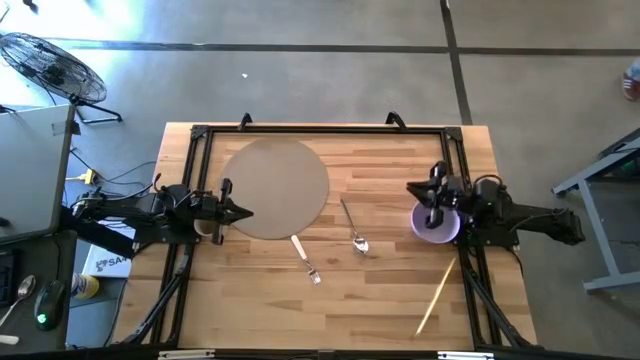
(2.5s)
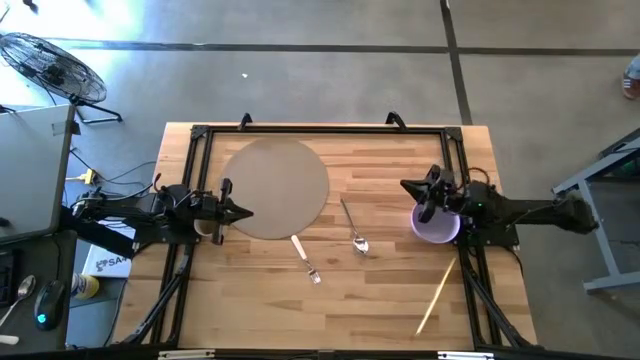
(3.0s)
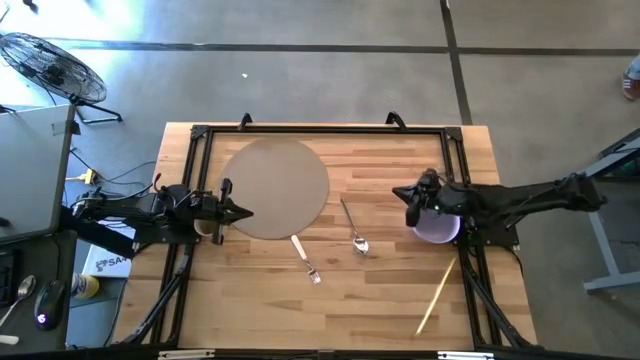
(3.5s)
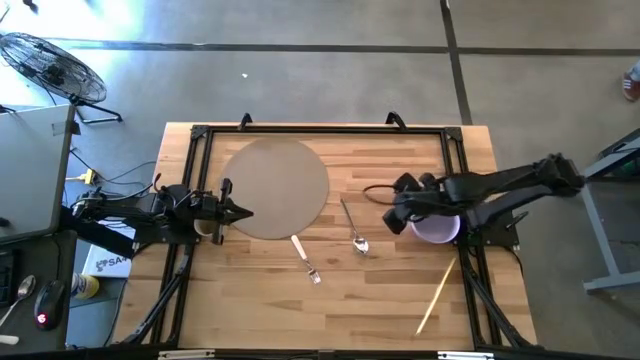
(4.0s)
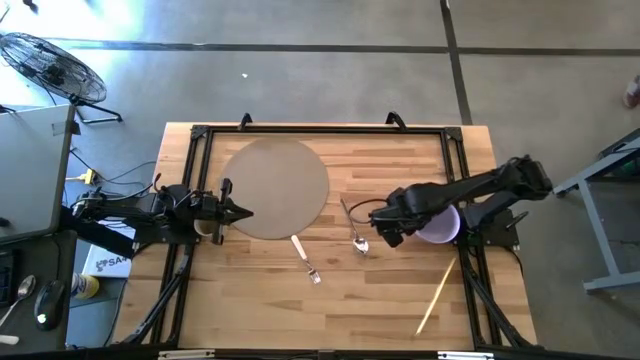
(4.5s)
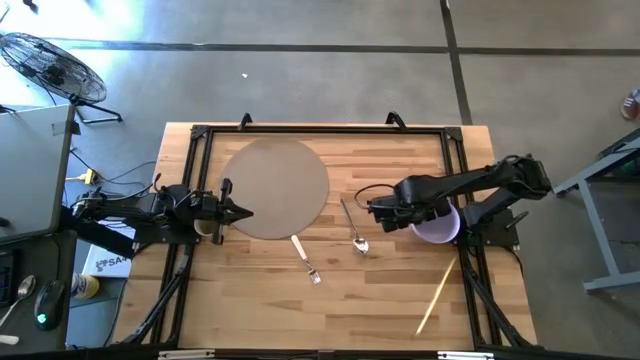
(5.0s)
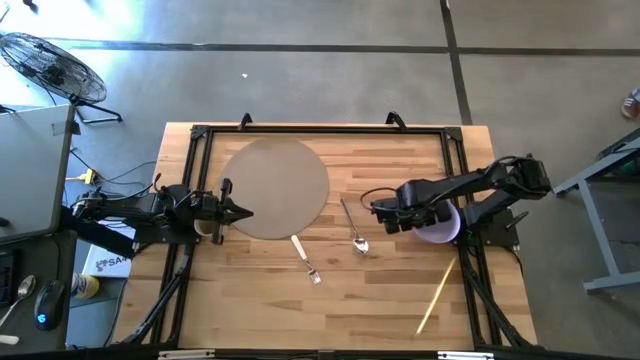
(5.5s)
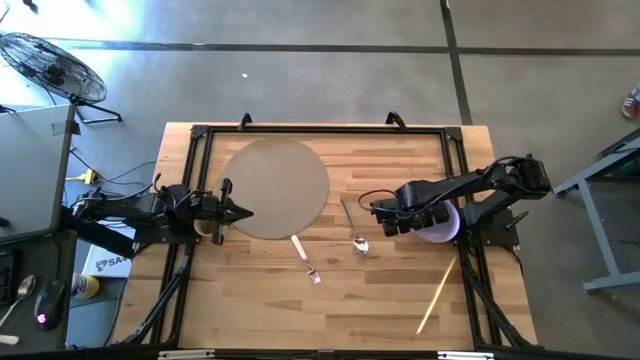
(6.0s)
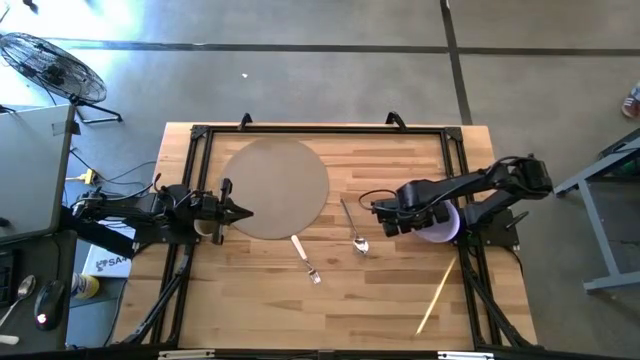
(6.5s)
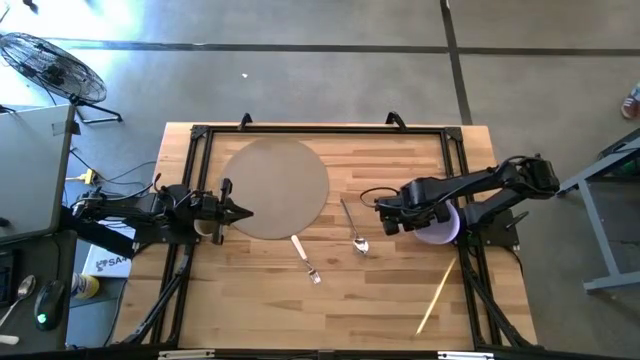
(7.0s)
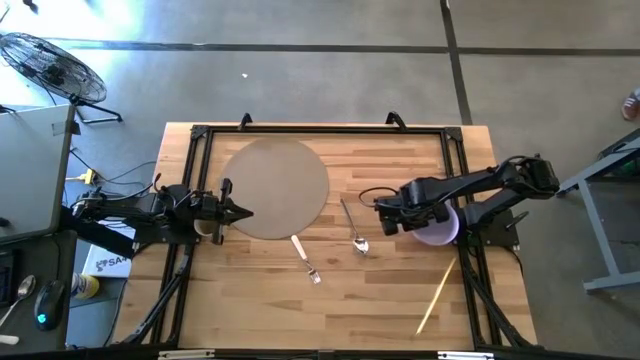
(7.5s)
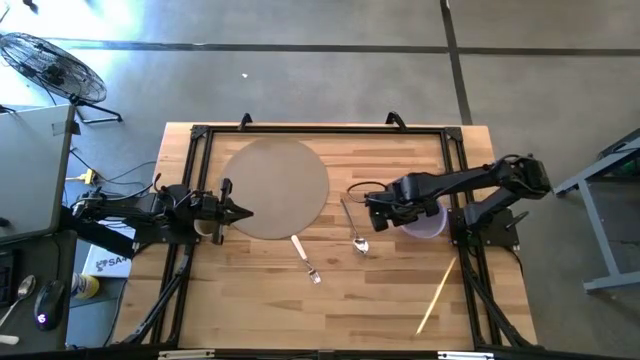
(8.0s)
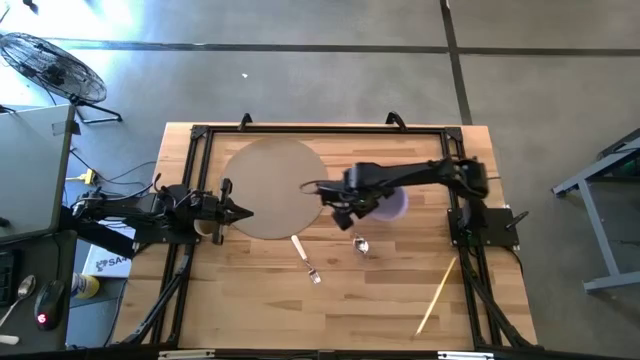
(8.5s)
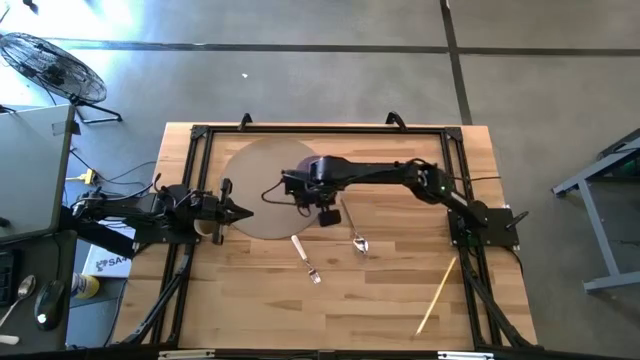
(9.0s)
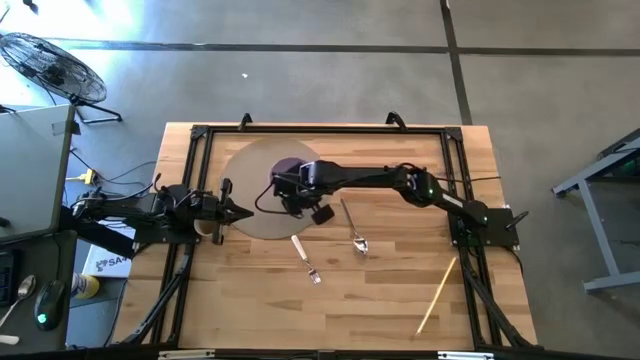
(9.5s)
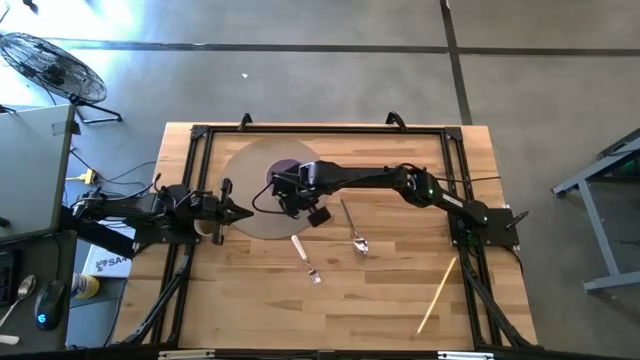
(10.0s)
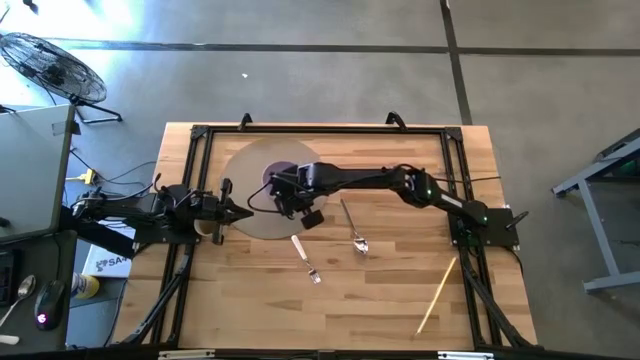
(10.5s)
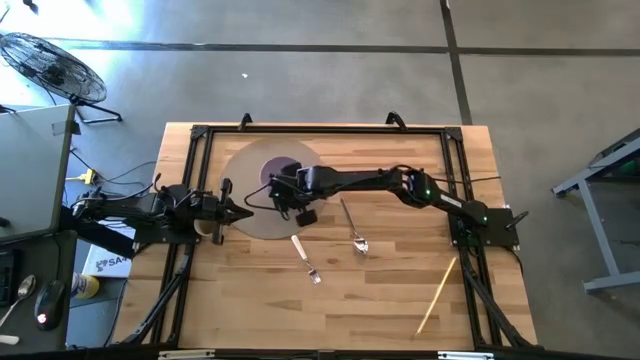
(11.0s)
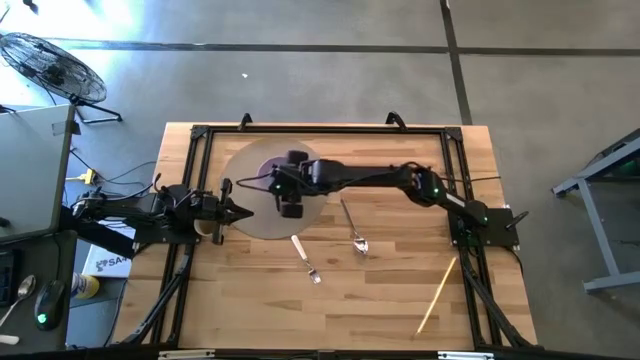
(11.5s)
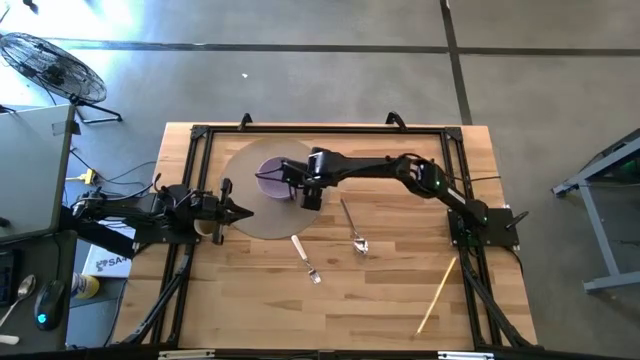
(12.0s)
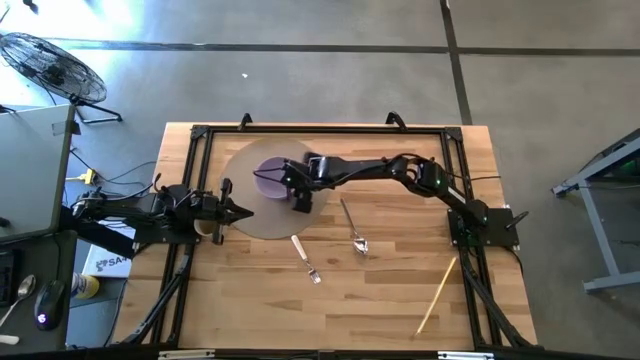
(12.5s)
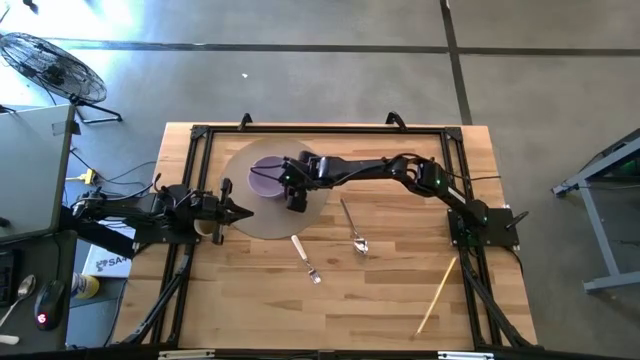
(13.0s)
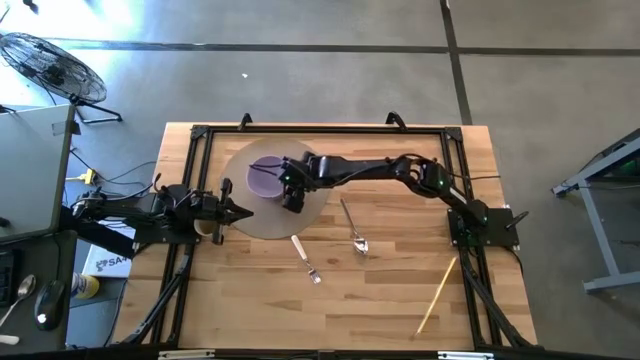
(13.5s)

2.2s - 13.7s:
Task: Pick & Place Utensil
Put the purple bowl on the gray placemat

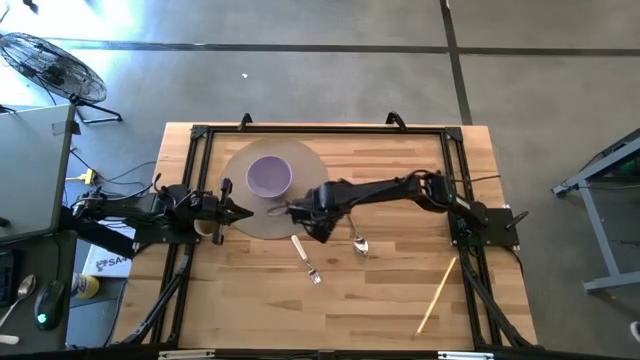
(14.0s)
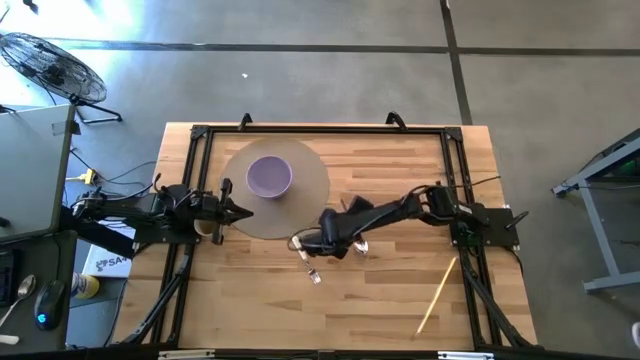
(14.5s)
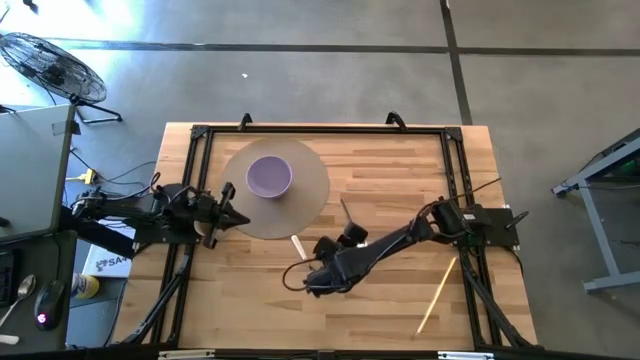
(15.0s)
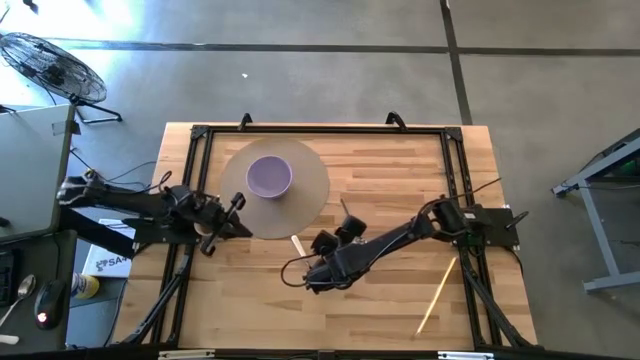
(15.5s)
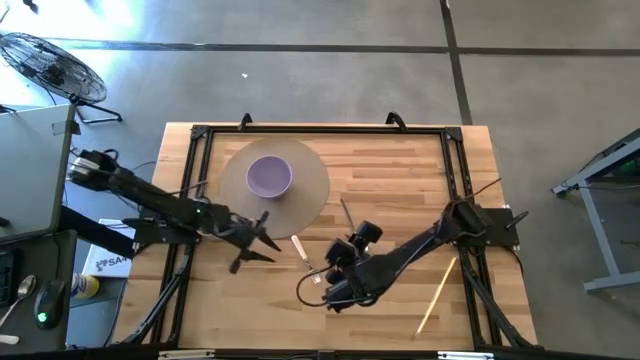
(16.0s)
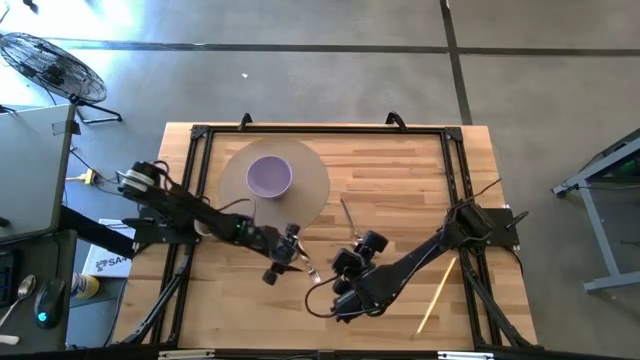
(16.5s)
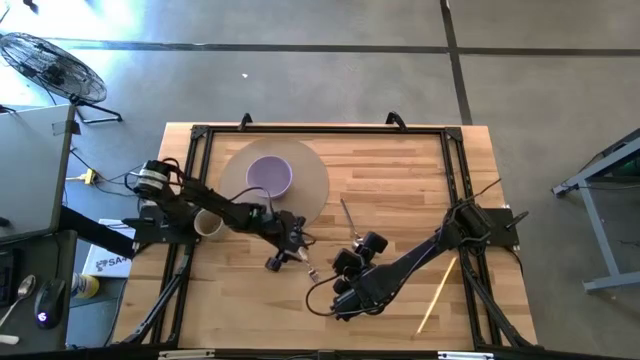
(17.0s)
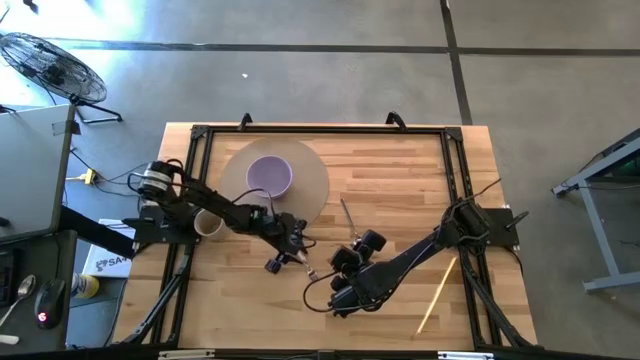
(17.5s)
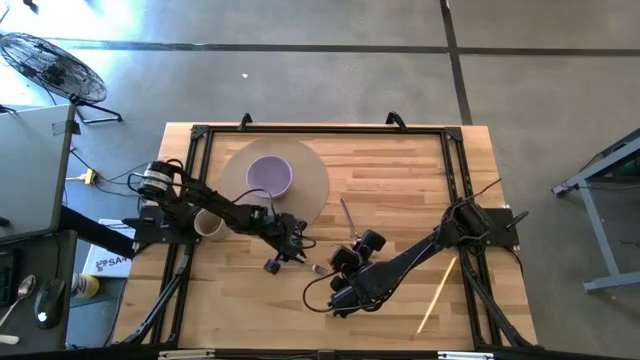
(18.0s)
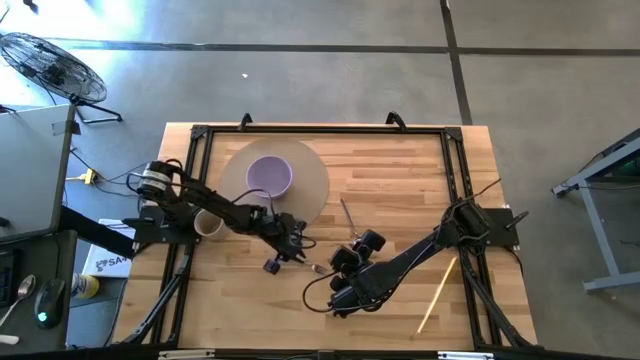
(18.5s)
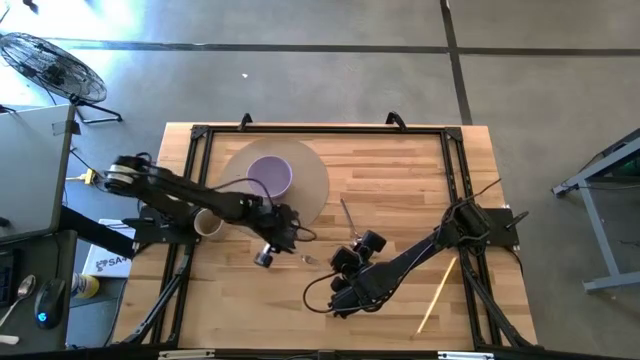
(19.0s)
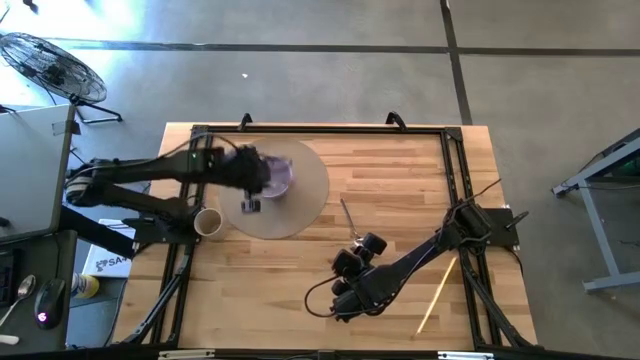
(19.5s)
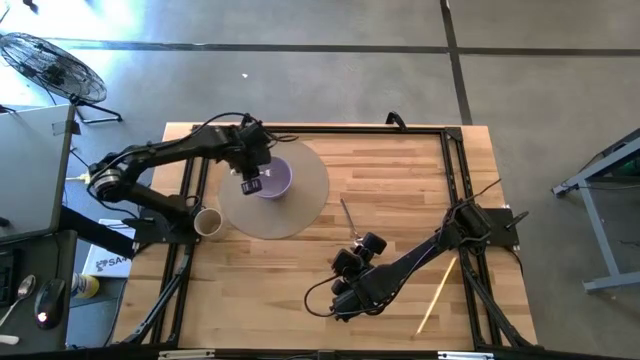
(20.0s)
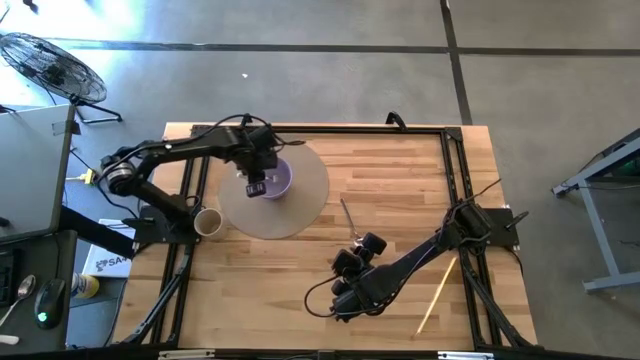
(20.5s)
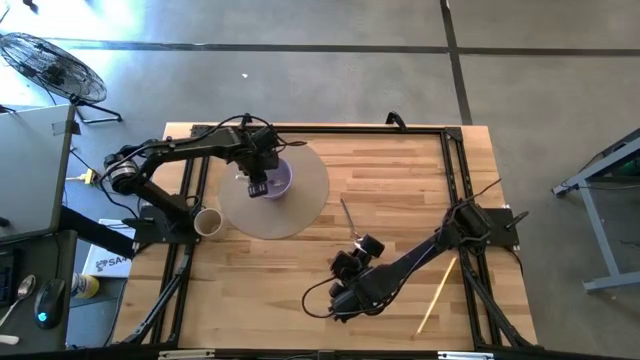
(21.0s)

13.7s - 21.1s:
Put the white fork into the purple bowl on the gray placemat

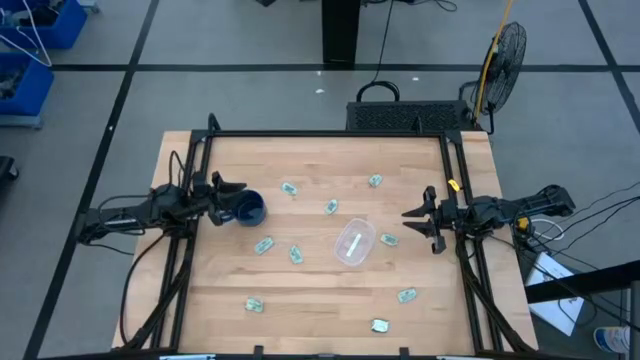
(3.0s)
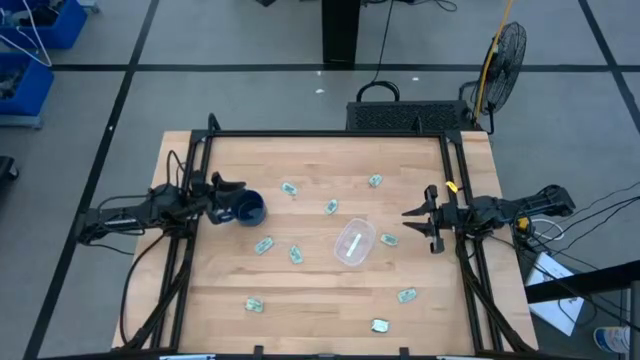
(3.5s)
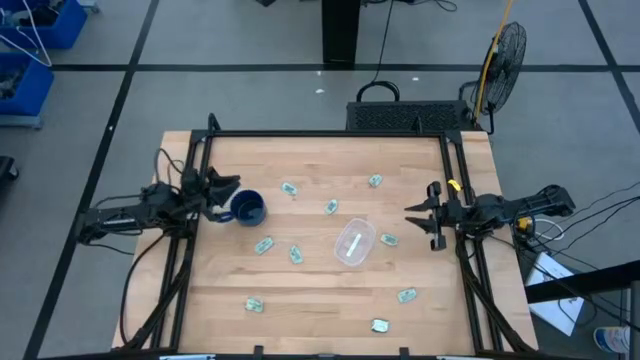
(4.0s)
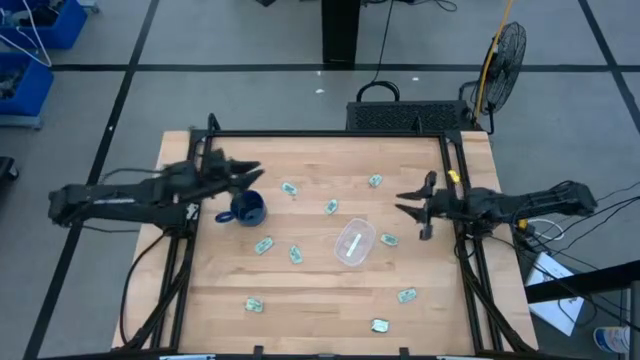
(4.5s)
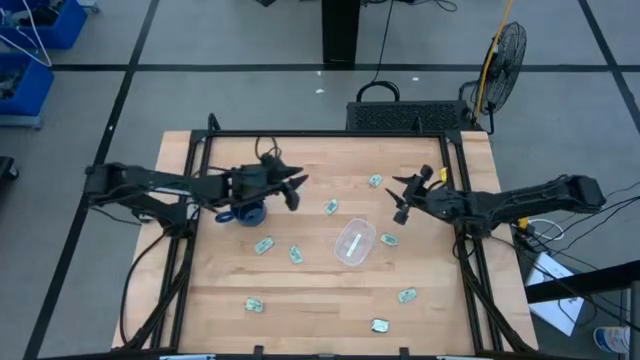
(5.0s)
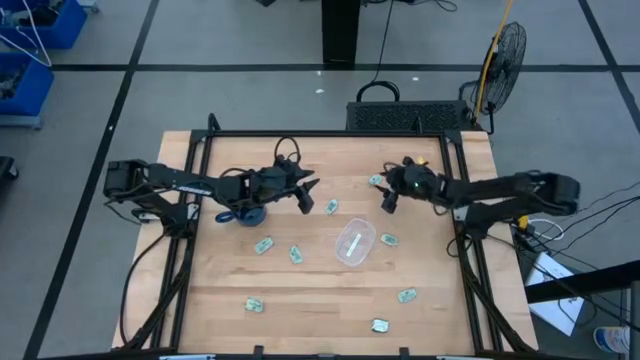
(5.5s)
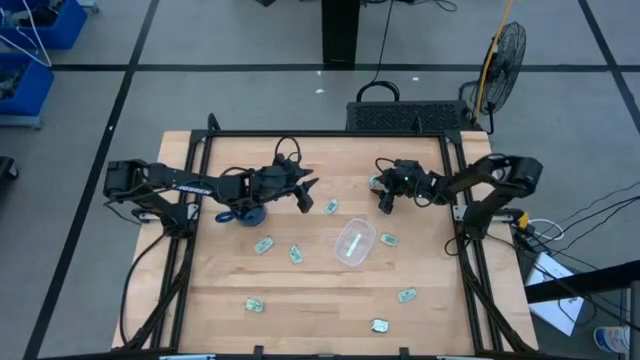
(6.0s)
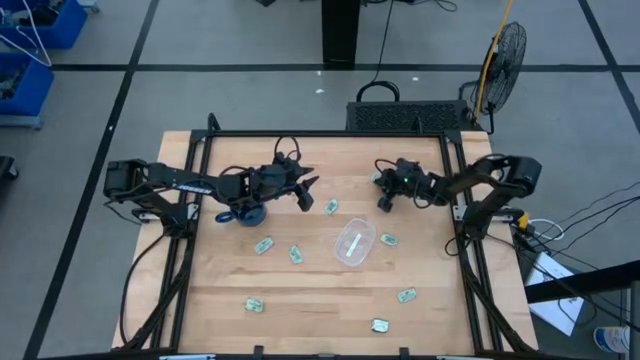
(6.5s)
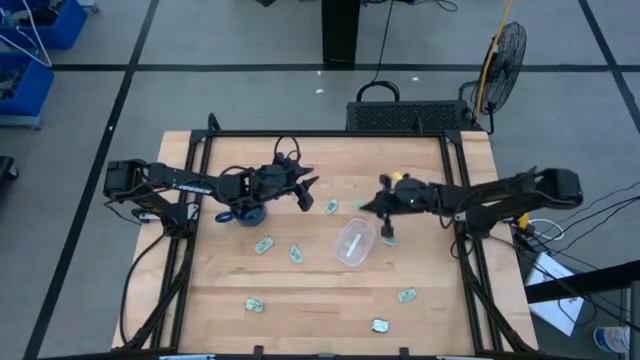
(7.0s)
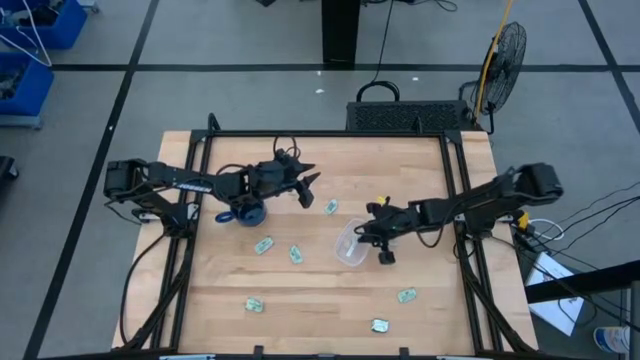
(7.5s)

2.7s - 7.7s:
Task: Pick and place Stevia / Truvia into bins
Put the stevia packet into the transparent container
